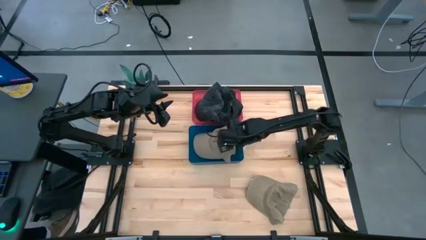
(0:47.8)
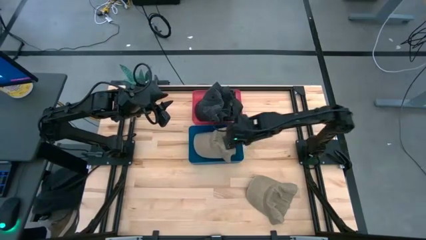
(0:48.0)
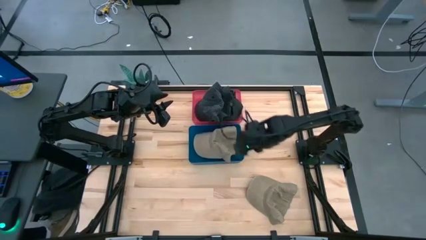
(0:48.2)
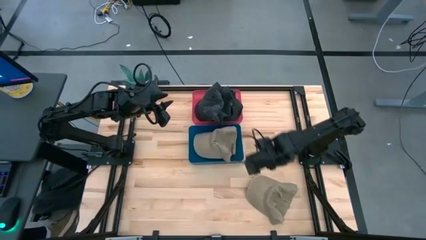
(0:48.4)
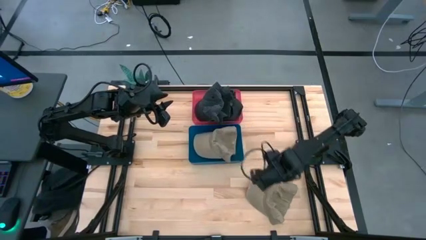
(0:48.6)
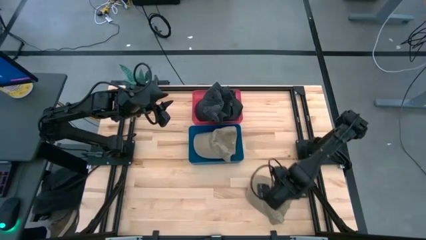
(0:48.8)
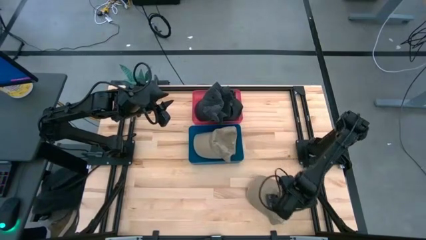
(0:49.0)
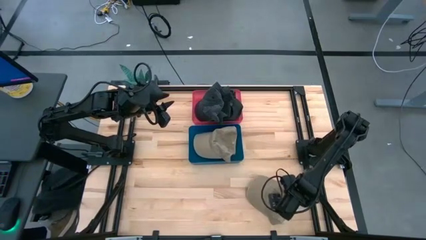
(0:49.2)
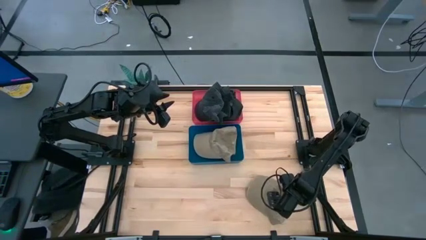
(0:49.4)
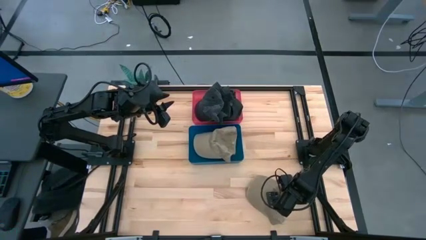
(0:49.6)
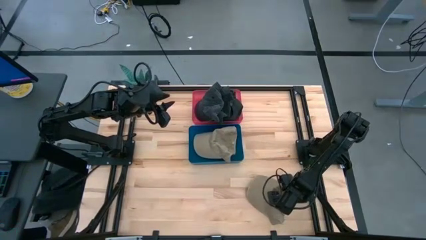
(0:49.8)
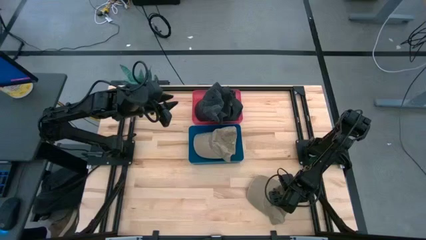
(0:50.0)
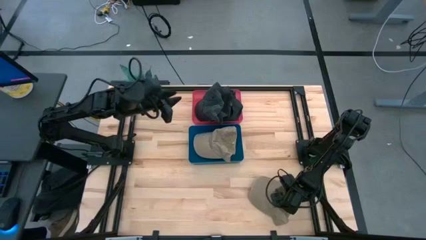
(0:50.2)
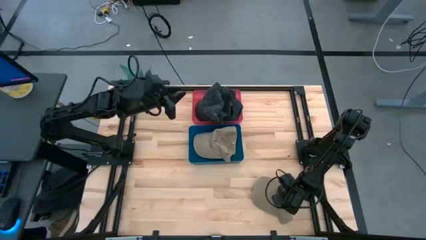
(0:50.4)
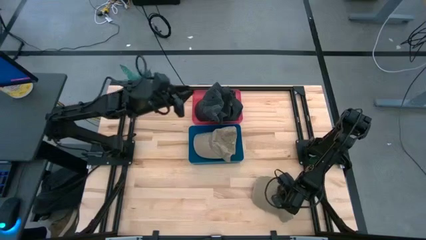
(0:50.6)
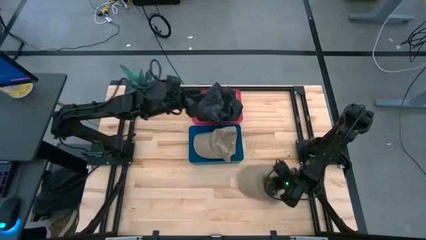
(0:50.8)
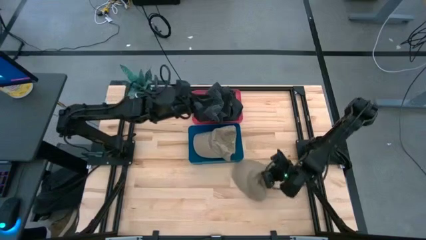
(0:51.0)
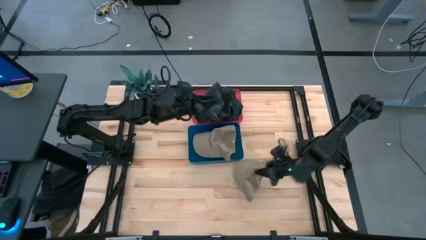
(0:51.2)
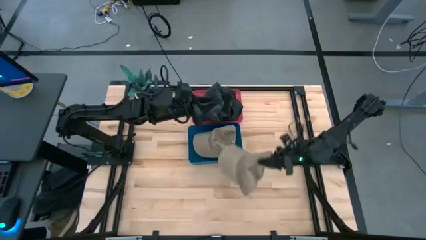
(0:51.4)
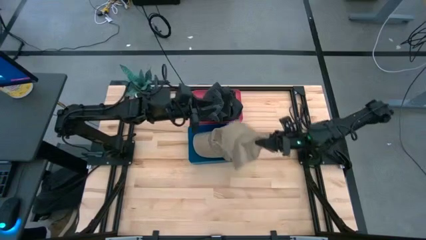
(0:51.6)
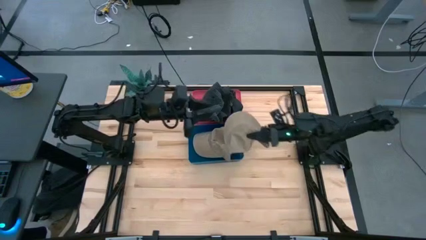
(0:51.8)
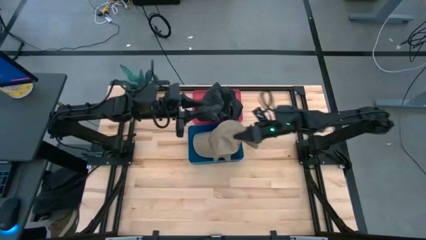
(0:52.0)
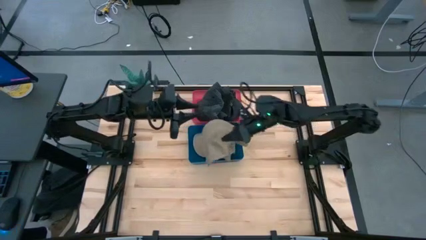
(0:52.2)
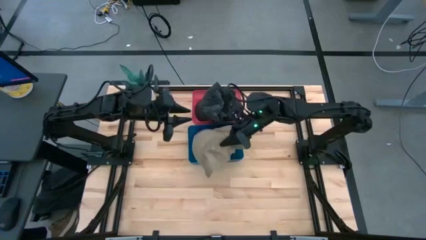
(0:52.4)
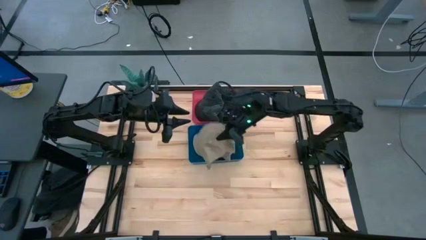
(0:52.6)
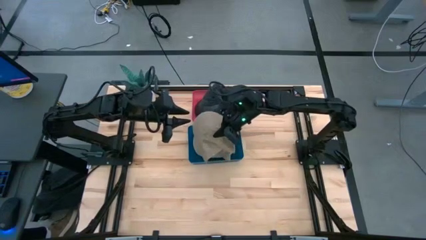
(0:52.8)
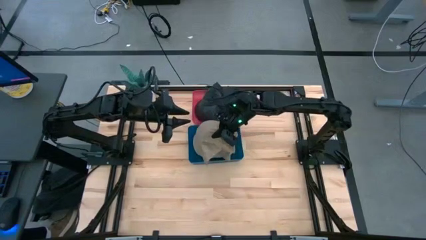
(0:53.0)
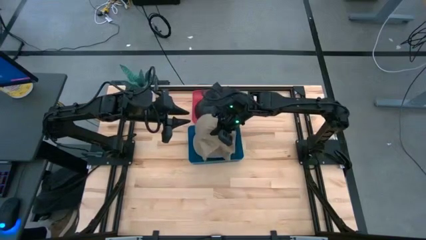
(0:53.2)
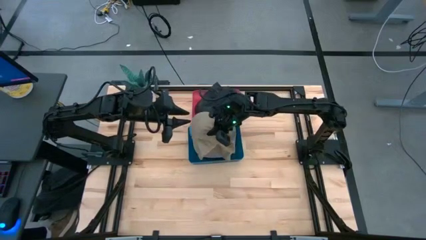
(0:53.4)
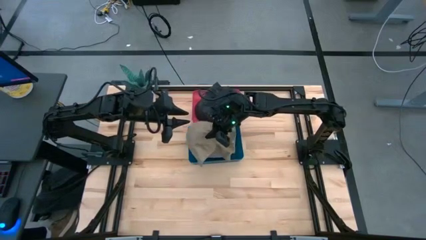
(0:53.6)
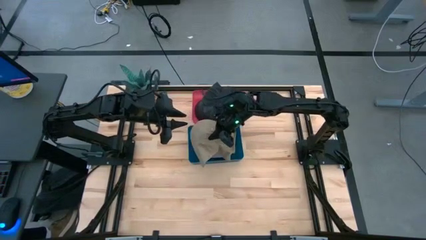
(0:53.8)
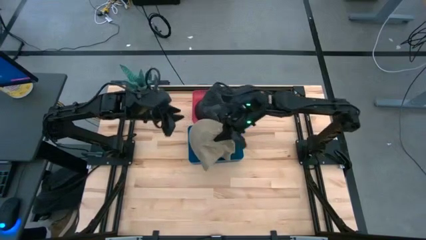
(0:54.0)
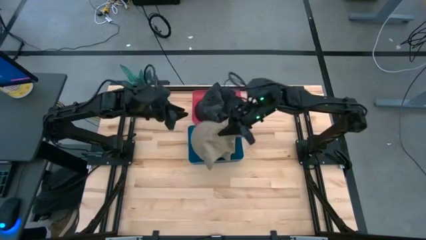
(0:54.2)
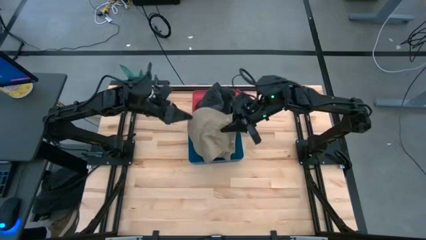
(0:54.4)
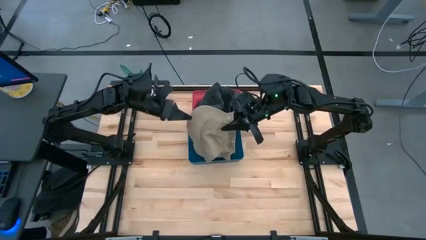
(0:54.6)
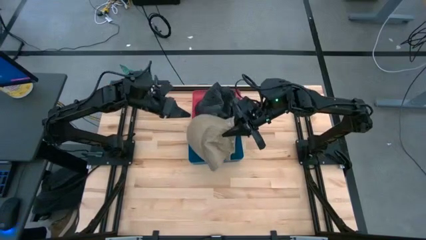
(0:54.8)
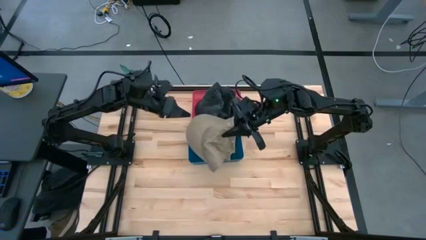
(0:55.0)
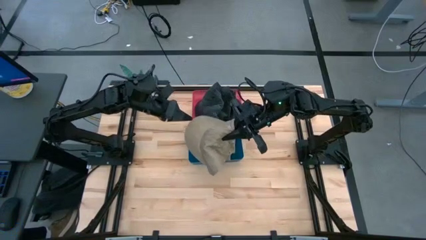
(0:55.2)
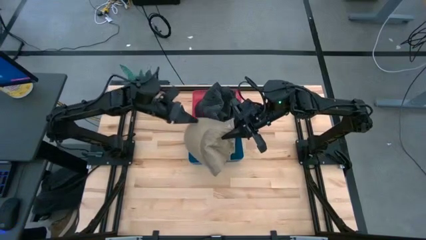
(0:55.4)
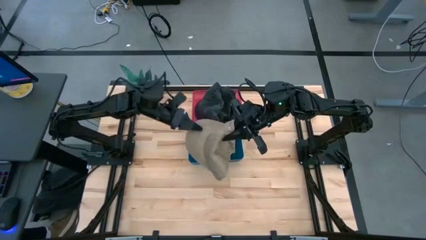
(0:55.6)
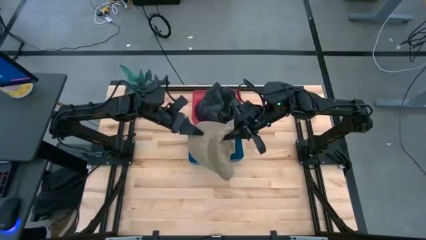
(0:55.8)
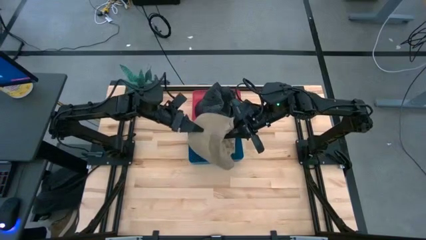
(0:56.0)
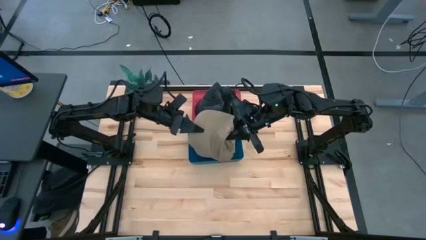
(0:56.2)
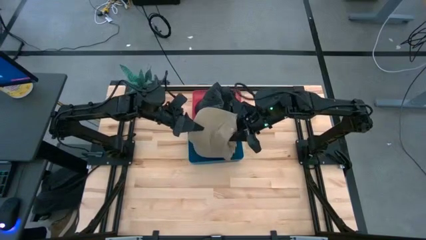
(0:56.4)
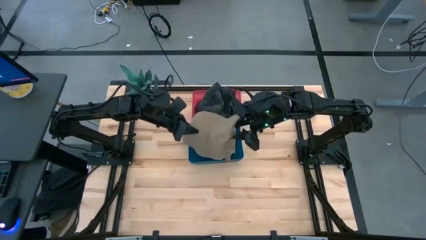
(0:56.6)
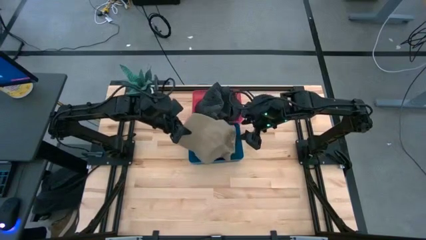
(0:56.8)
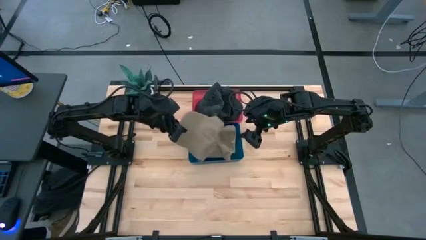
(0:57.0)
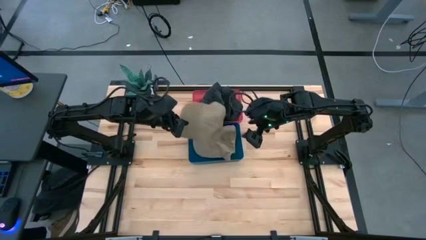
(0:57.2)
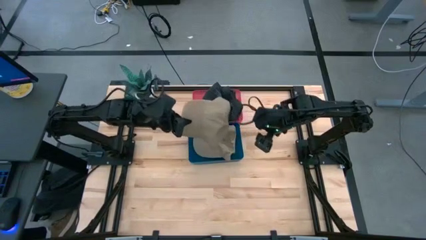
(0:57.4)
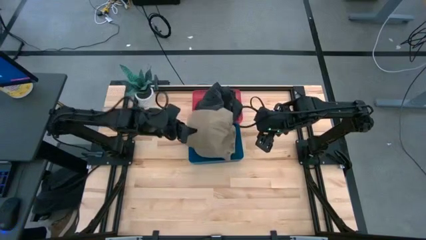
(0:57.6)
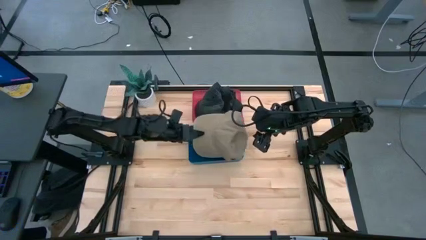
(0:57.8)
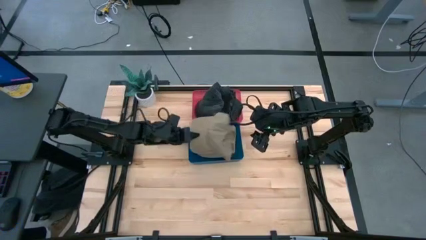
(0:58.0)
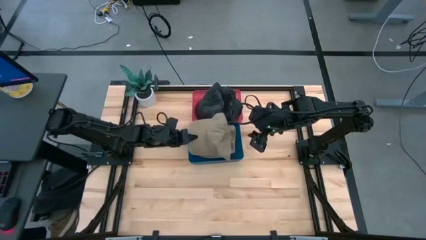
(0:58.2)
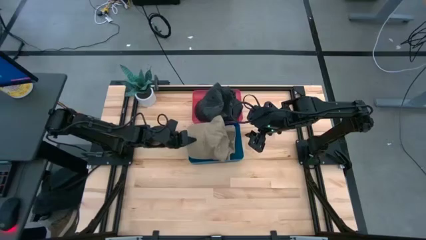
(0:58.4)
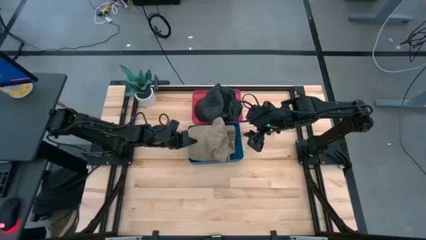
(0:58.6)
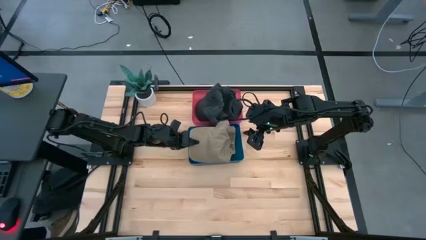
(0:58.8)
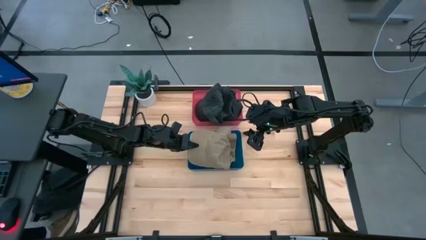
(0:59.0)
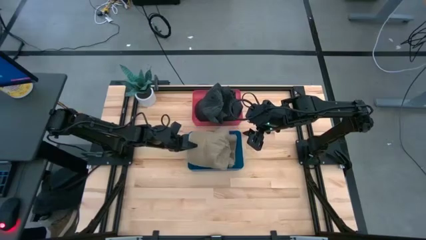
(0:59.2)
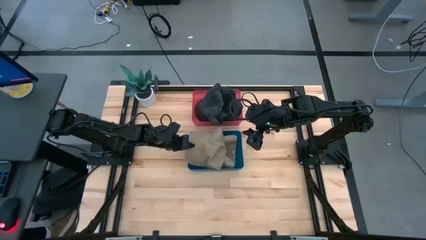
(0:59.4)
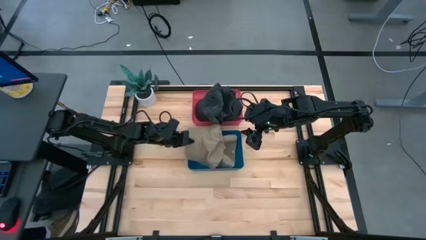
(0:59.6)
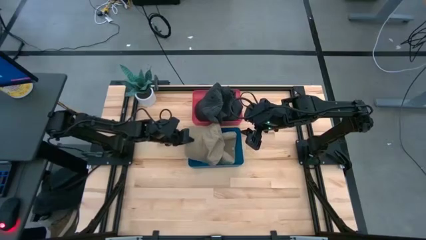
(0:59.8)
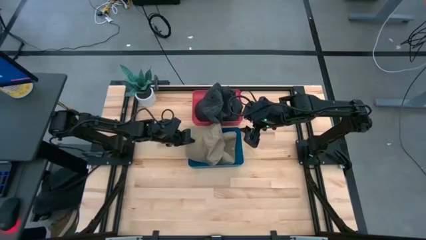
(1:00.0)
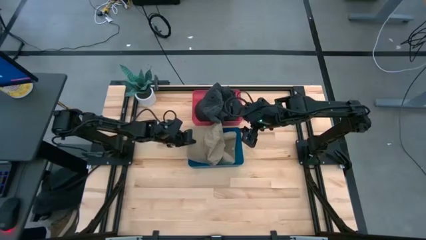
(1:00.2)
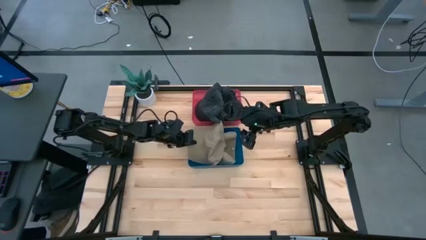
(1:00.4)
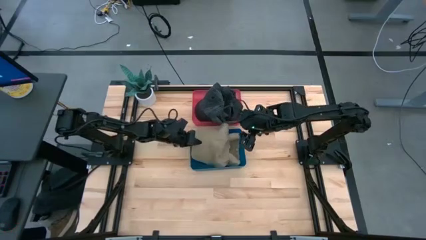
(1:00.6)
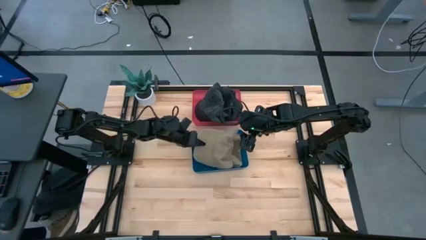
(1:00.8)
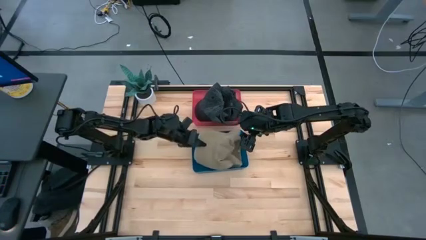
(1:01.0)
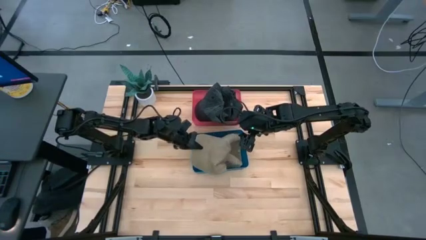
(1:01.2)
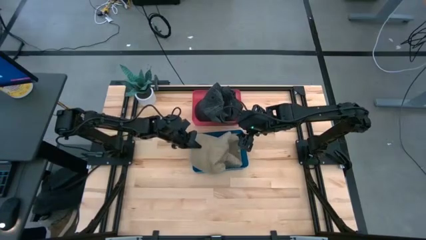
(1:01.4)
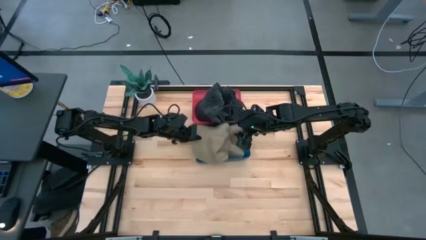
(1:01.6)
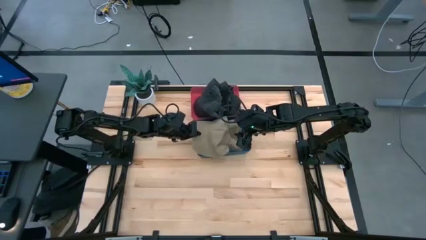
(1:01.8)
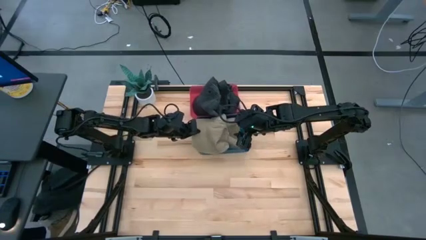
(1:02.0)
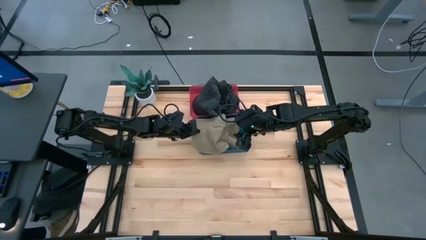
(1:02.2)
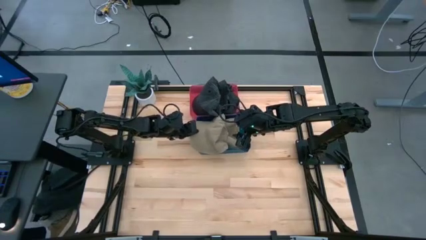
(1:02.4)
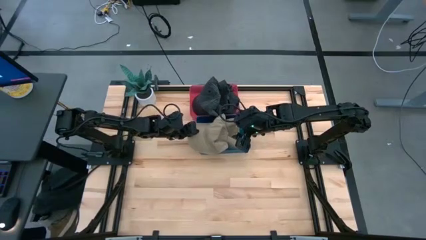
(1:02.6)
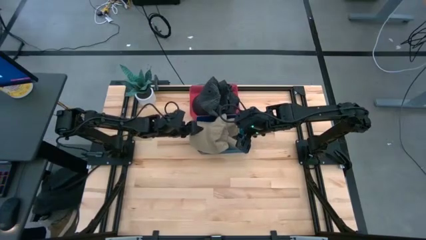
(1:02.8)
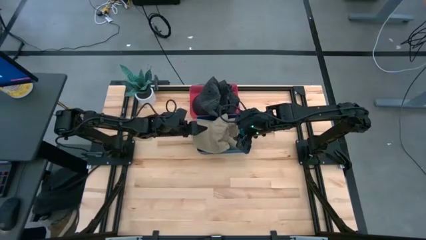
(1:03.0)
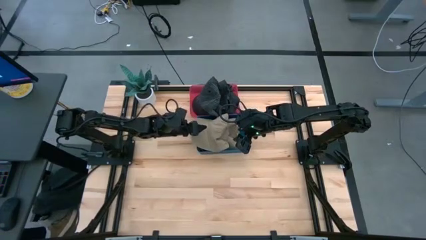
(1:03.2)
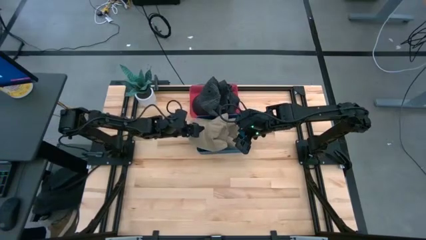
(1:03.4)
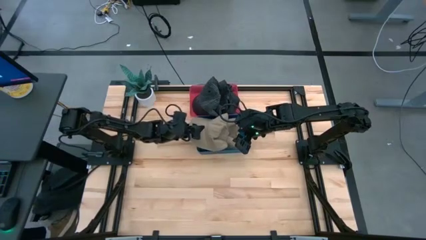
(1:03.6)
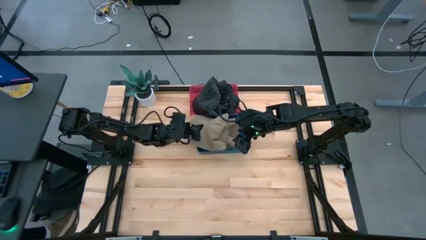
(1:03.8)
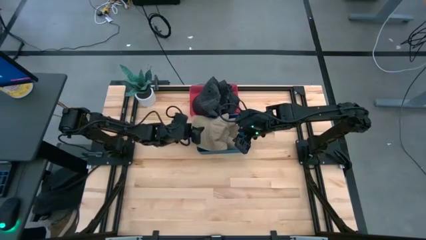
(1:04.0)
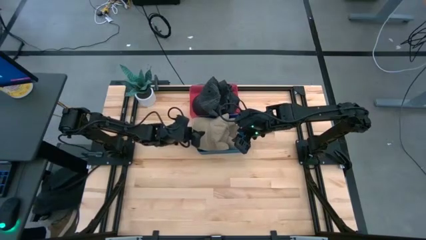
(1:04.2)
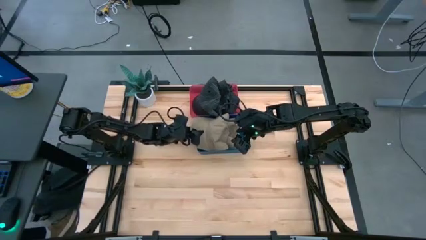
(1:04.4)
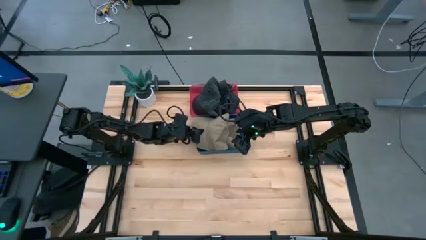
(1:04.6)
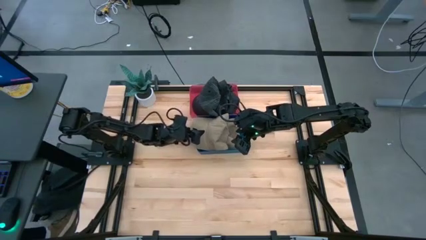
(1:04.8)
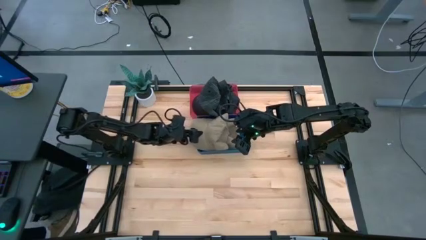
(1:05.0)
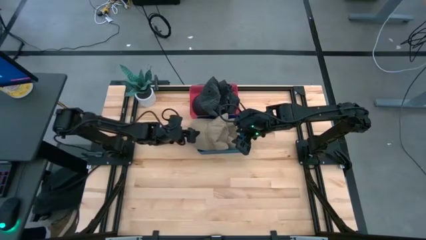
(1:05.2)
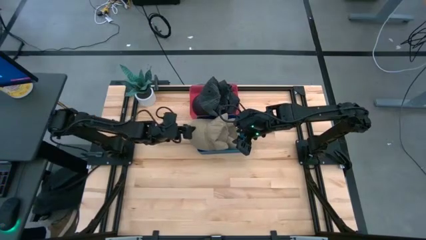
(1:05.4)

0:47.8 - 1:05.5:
Task: Pick & Place hat
Put the brown cap into the blue bin
